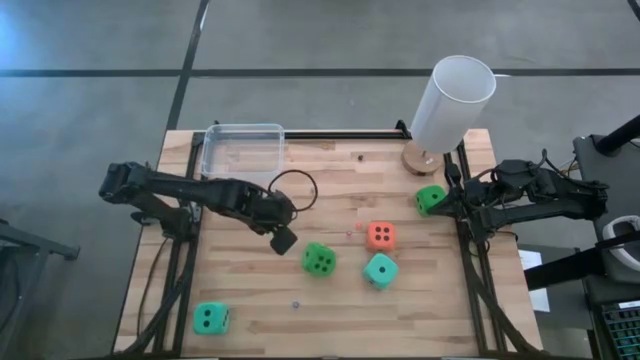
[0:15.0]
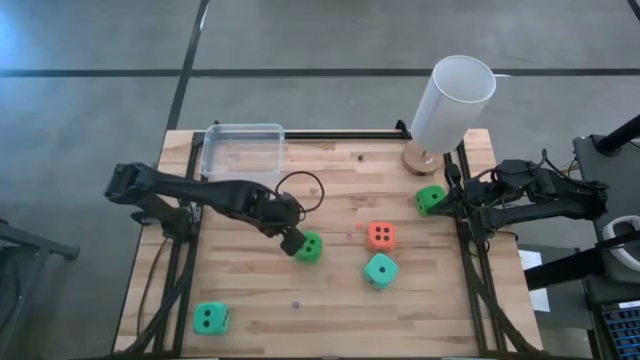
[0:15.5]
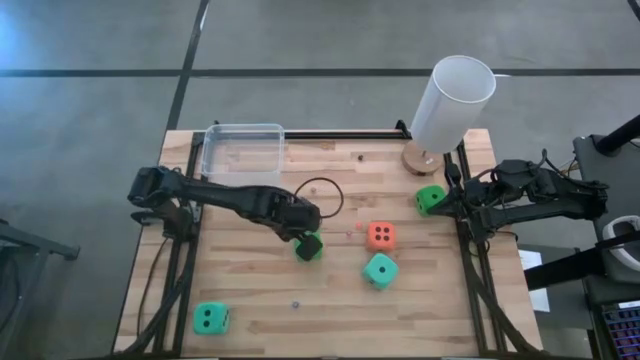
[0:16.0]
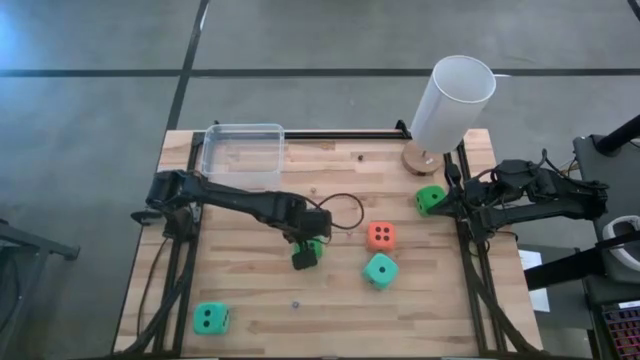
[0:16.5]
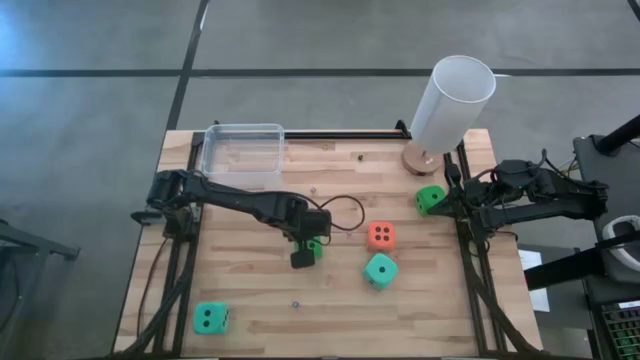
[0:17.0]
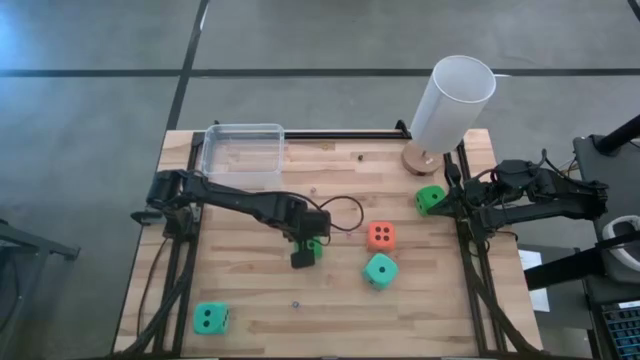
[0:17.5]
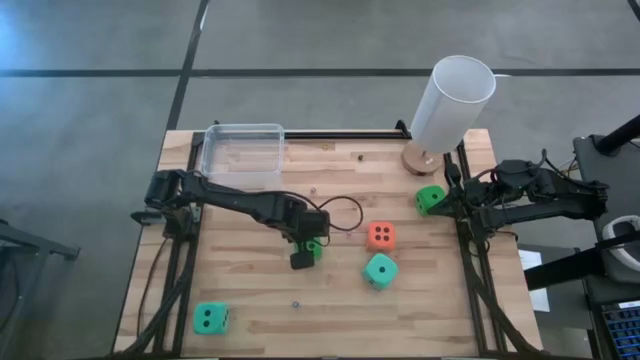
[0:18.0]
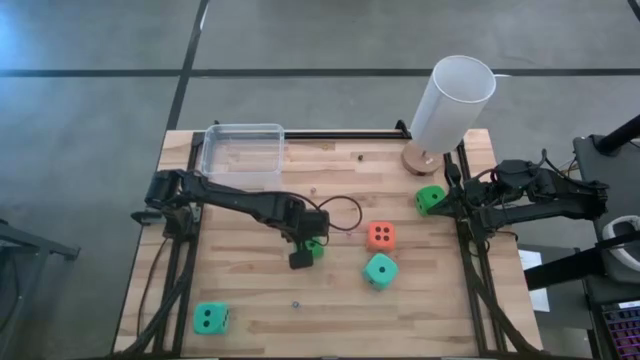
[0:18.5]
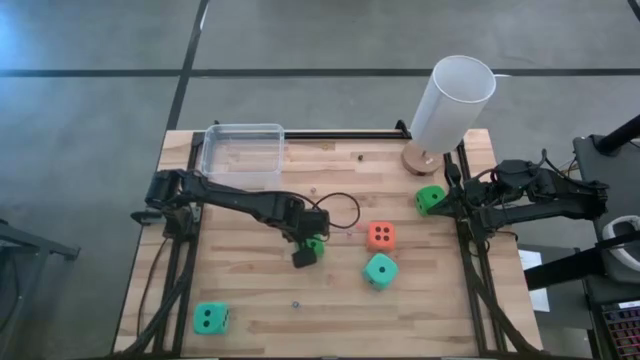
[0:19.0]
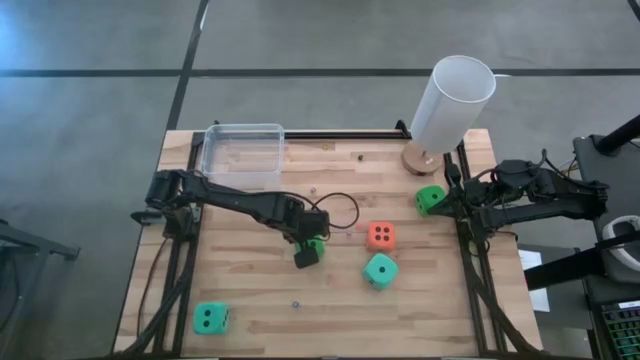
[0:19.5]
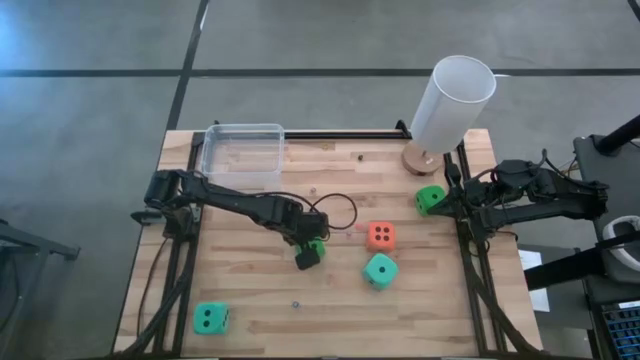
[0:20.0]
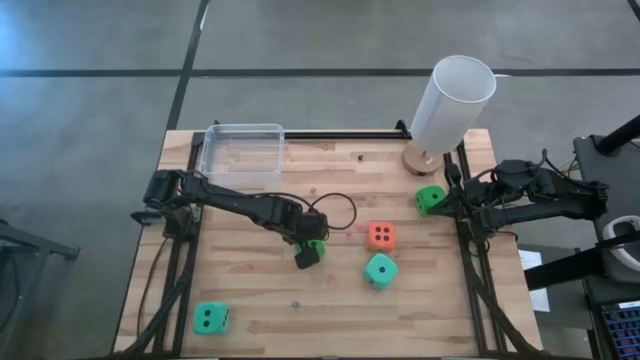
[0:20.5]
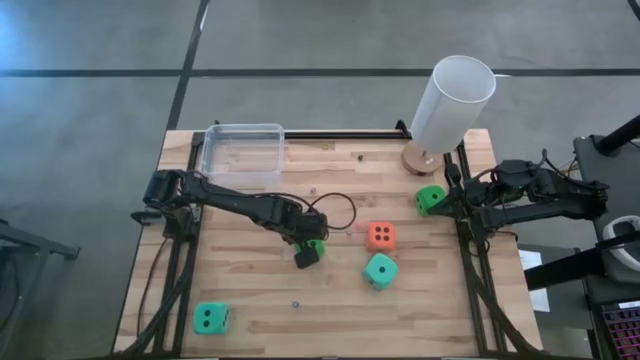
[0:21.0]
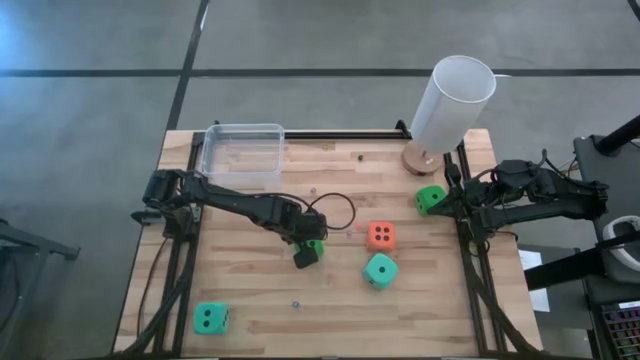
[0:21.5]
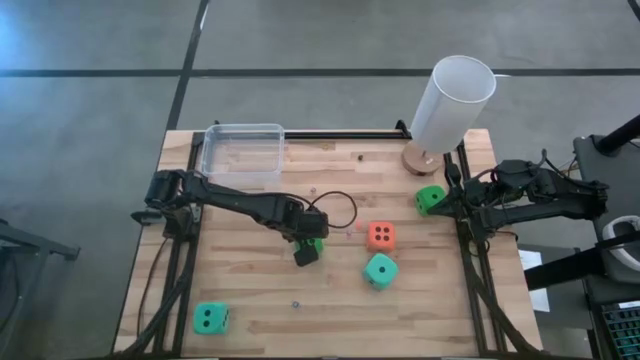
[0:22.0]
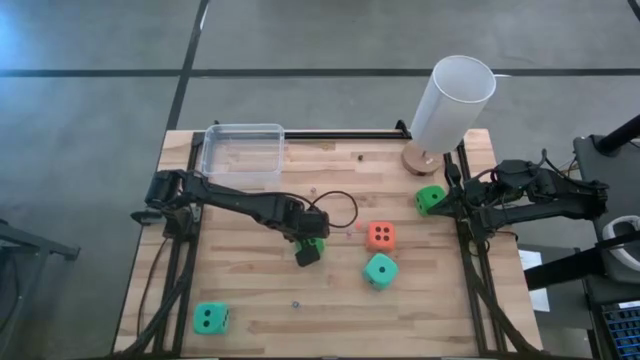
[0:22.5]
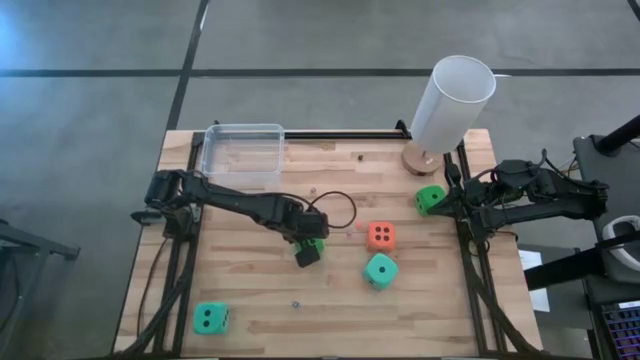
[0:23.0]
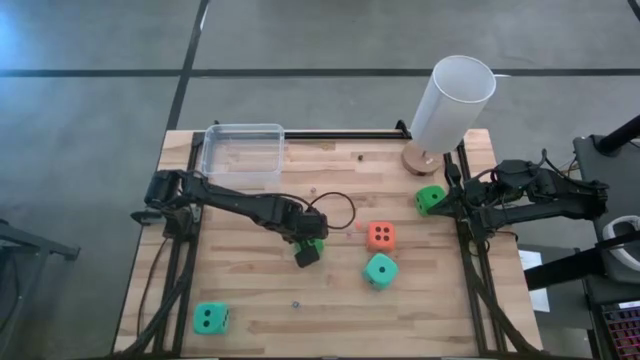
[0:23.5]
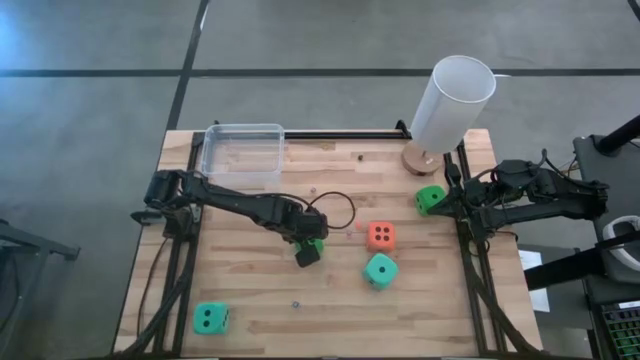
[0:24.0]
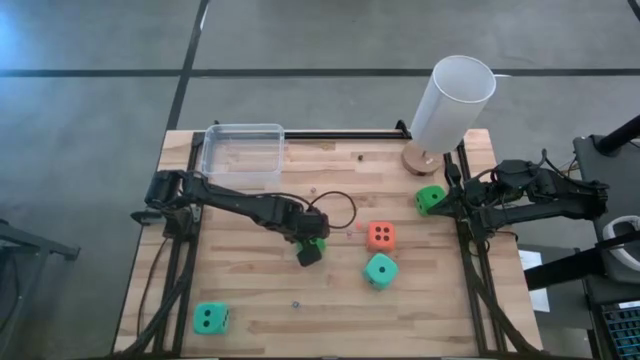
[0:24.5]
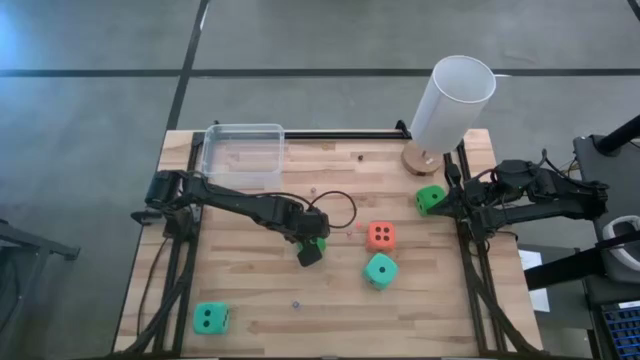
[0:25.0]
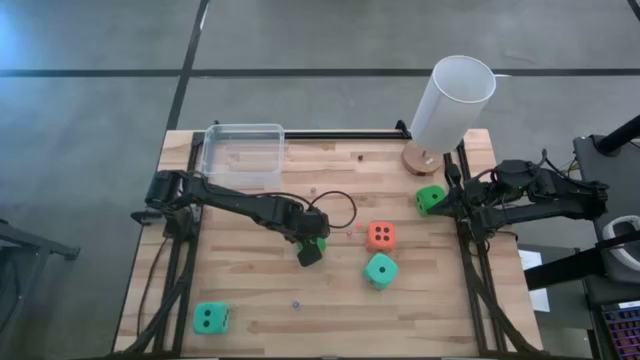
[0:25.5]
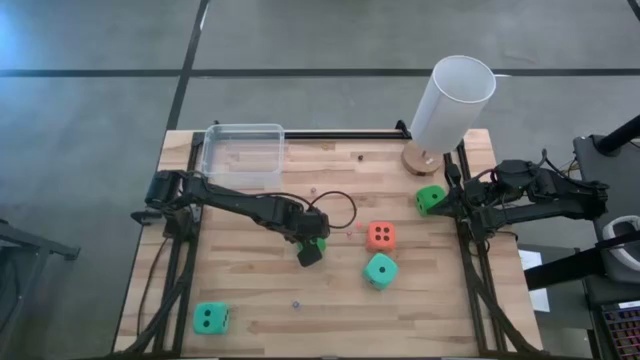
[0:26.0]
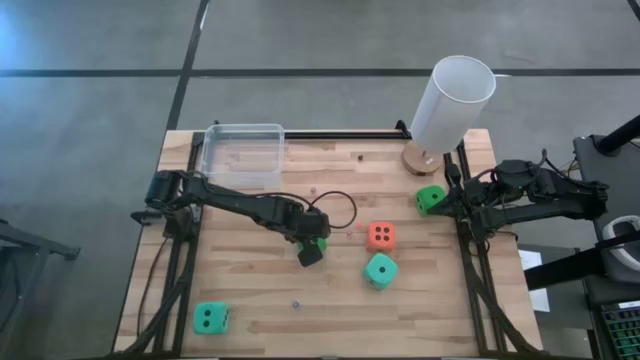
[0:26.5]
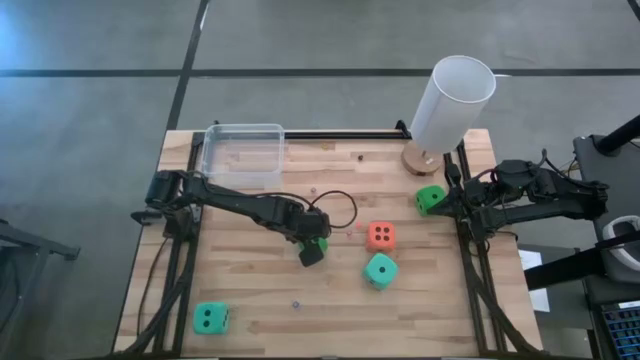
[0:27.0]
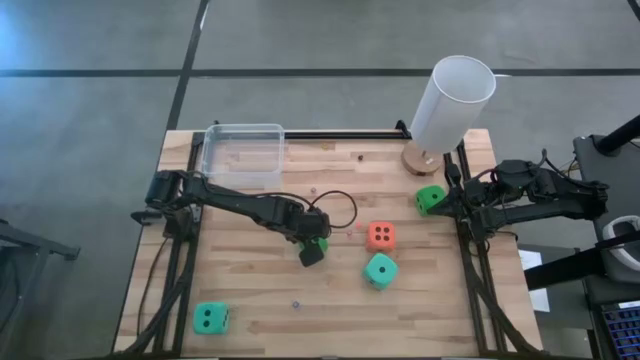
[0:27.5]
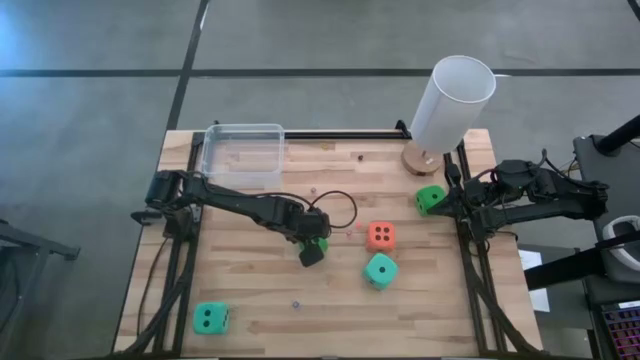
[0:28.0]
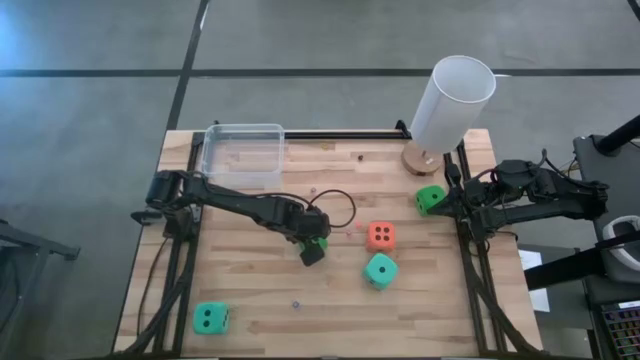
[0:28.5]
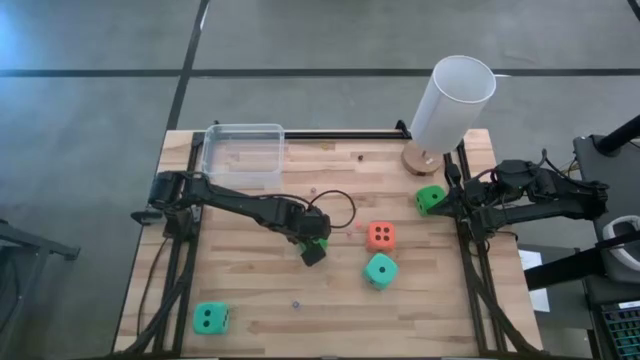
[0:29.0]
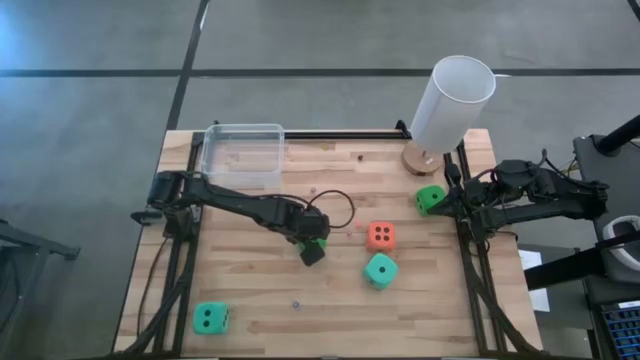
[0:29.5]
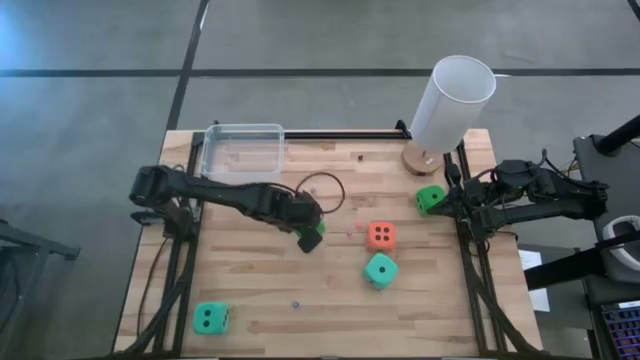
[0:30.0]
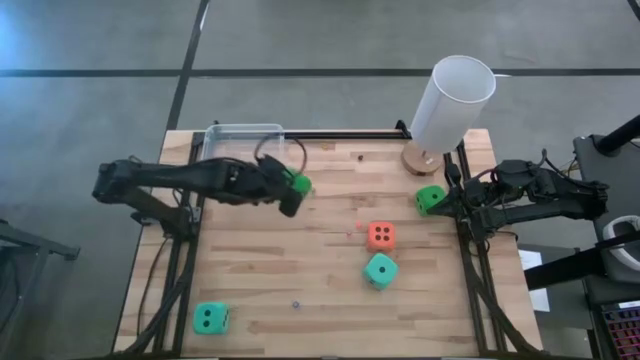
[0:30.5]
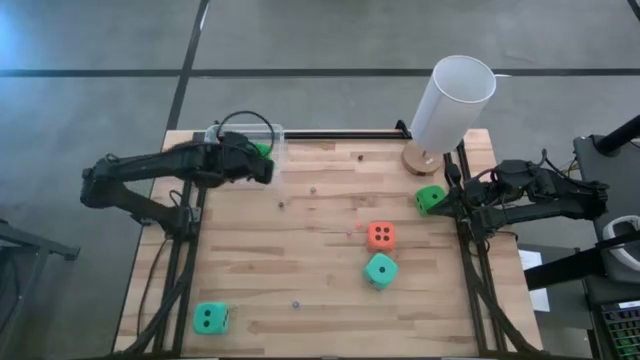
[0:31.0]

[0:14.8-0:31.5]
Task: Pick & Place Dice
Put the left green large dice into the transparent bin

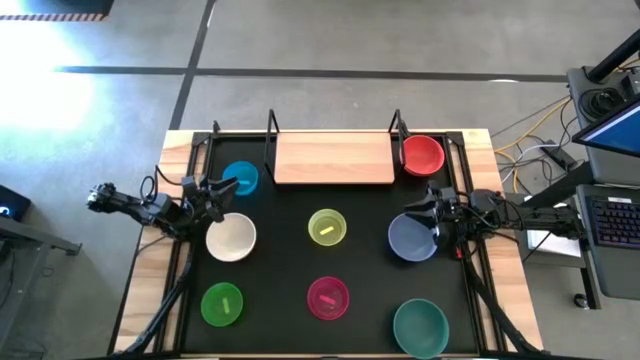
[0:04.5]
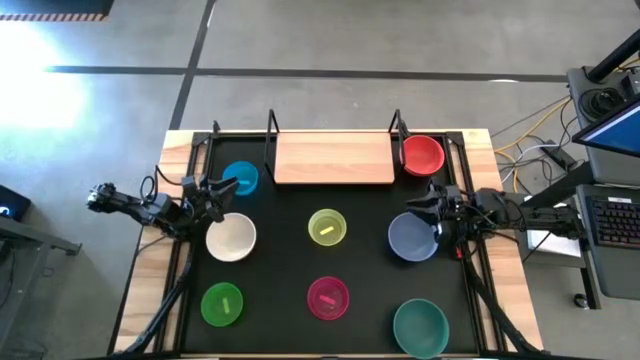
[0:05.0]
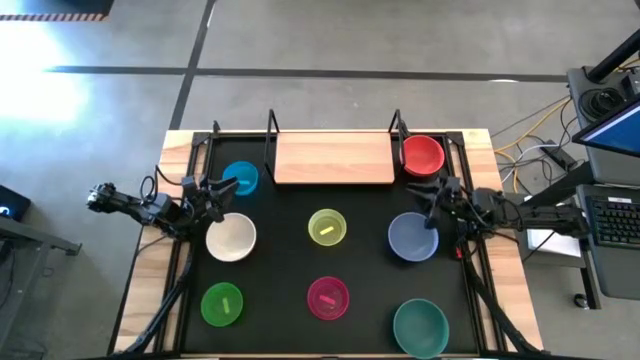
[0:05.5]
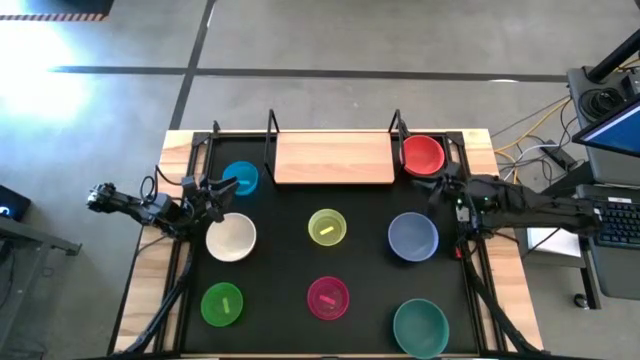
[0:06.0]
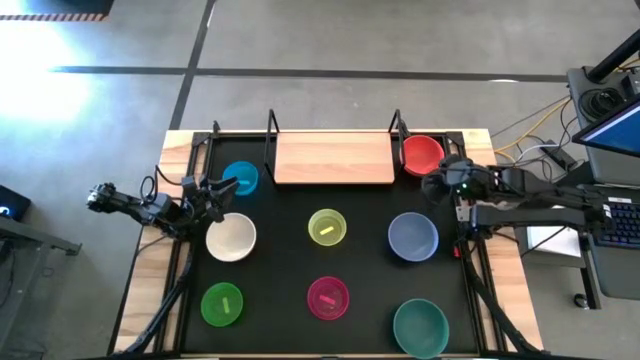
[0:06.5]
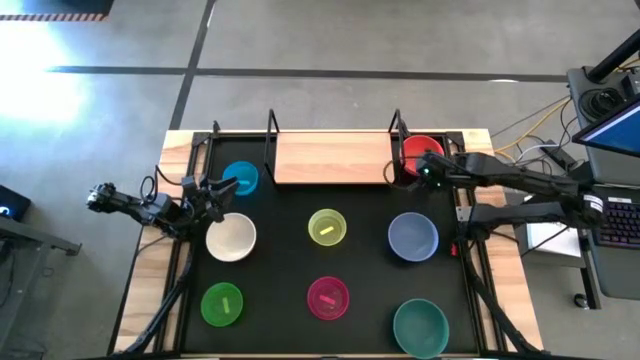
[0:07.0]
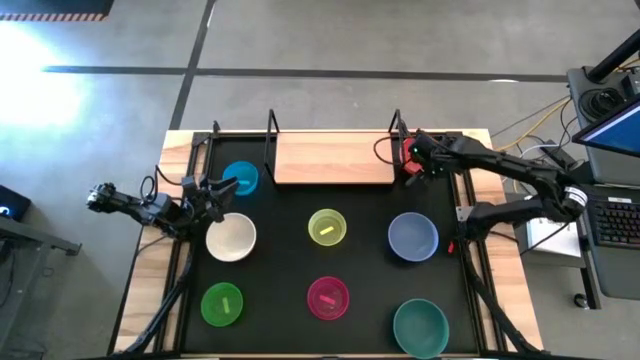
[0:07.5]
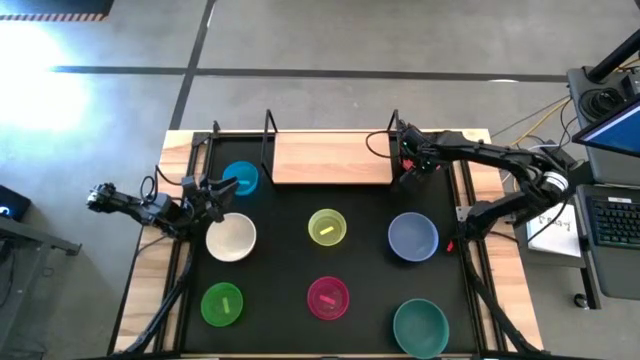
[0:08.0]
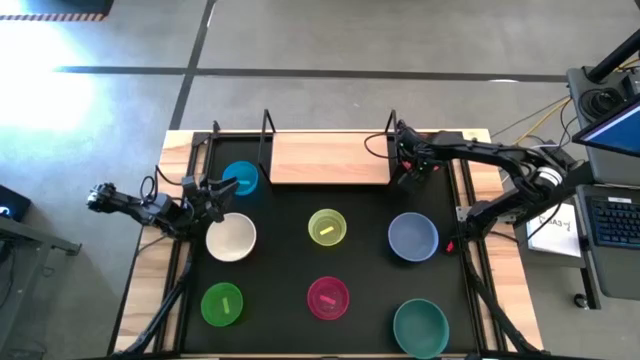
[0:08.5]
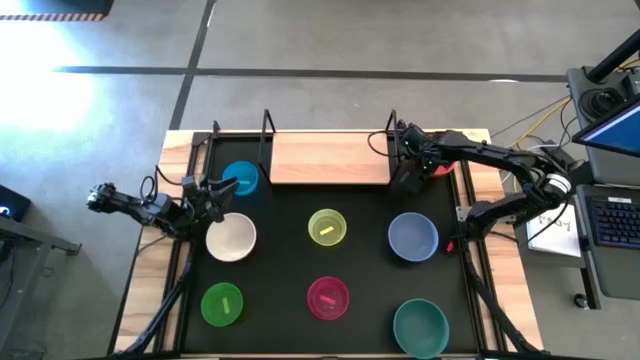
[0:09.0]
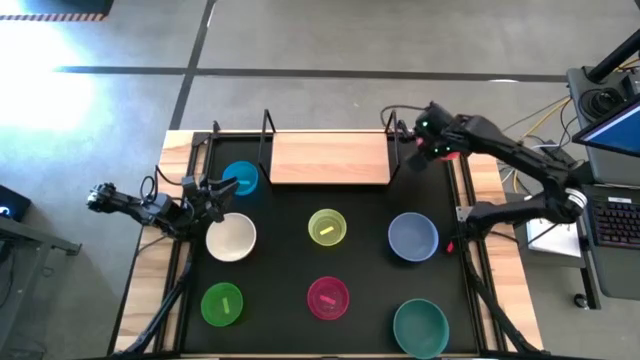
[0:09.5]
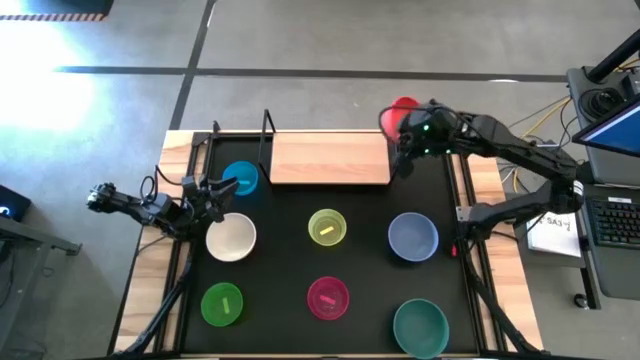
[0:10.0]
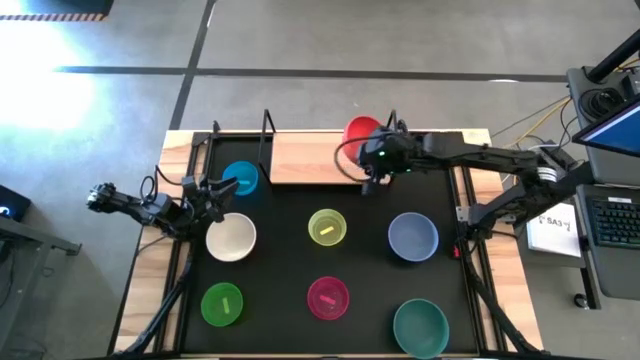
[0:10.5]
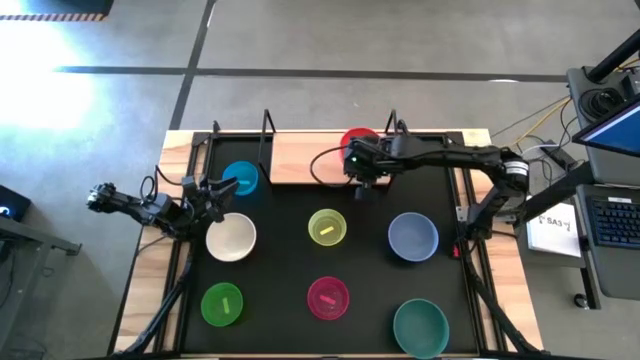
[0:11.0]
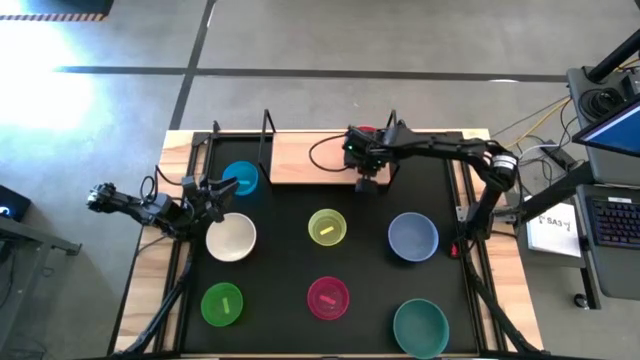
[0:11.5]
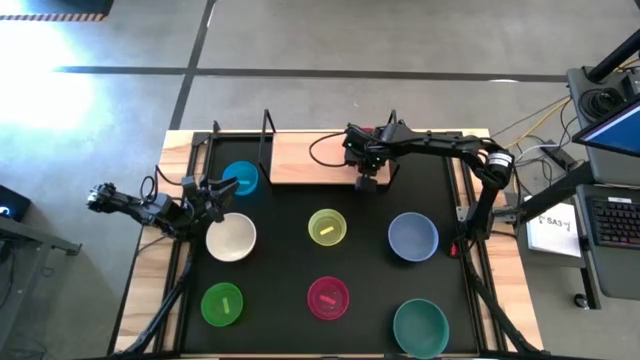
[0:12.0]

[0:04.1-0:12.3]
Task: Place and stack bowls onto a shelf
Put the orange bowl on the shelf
